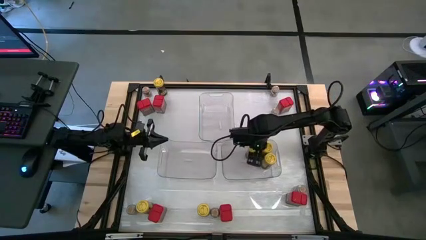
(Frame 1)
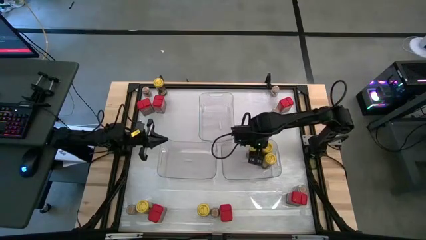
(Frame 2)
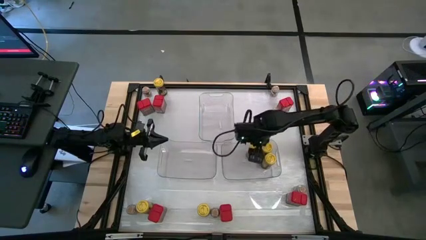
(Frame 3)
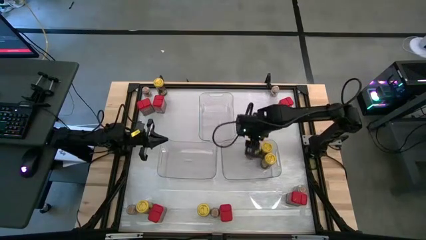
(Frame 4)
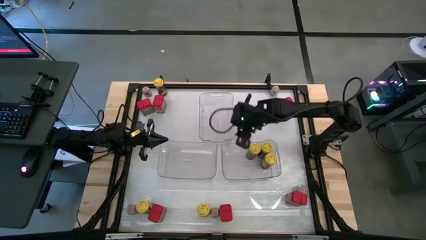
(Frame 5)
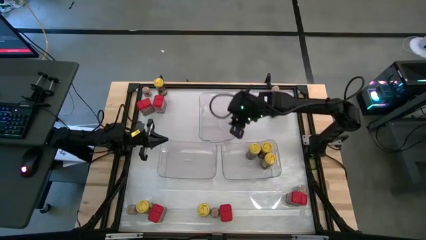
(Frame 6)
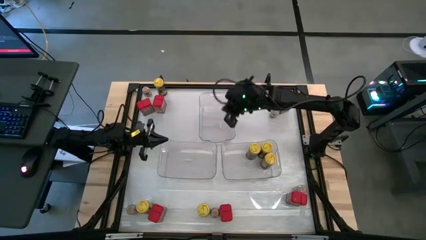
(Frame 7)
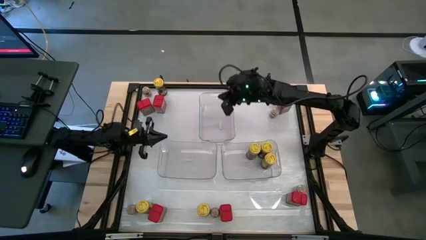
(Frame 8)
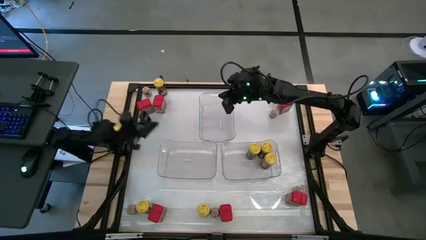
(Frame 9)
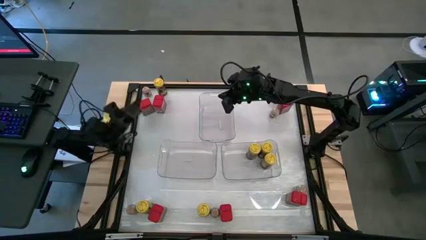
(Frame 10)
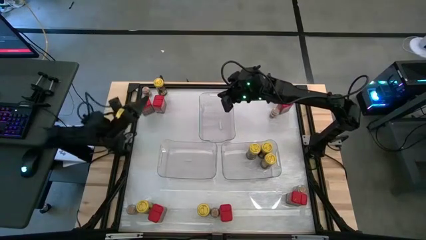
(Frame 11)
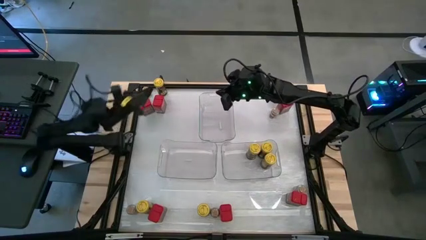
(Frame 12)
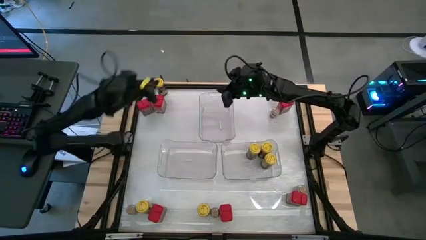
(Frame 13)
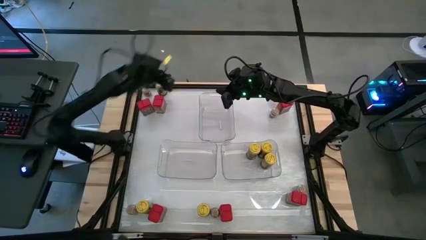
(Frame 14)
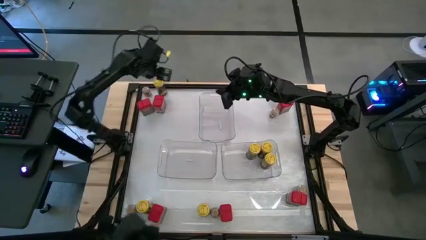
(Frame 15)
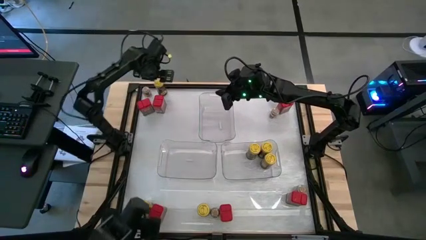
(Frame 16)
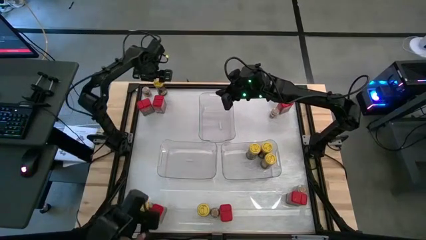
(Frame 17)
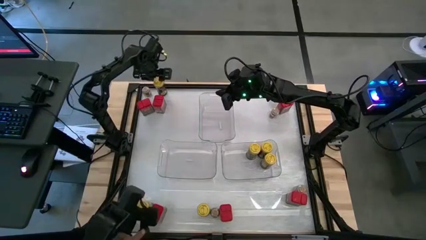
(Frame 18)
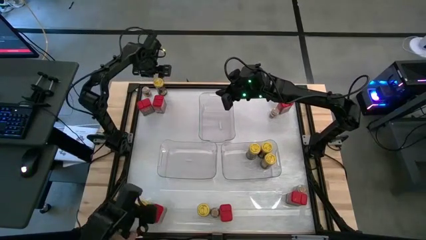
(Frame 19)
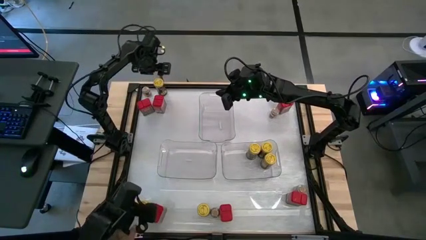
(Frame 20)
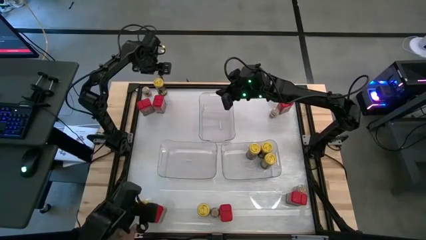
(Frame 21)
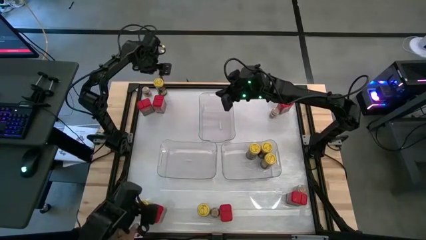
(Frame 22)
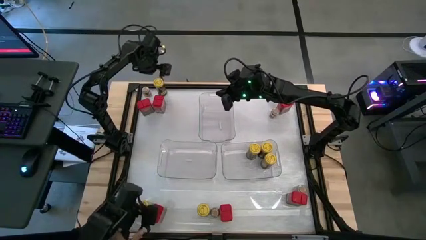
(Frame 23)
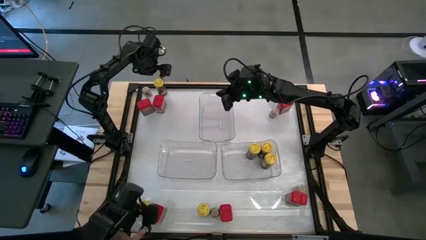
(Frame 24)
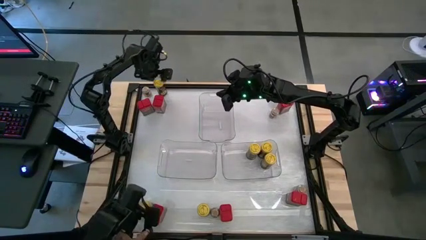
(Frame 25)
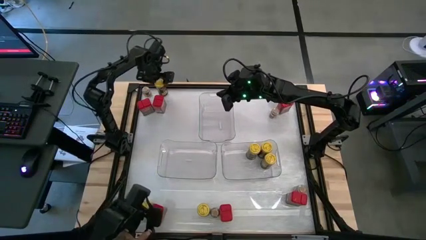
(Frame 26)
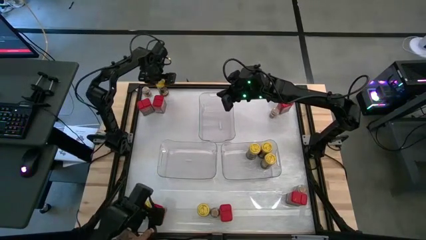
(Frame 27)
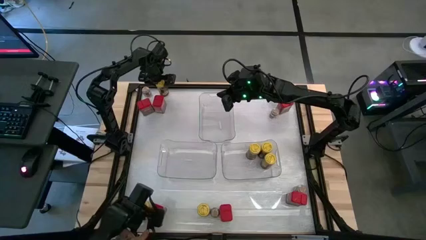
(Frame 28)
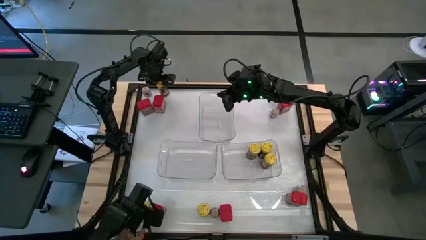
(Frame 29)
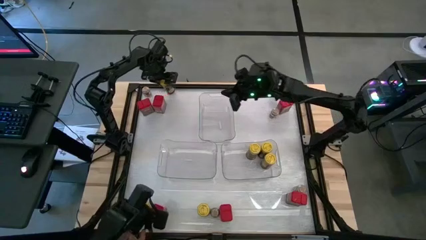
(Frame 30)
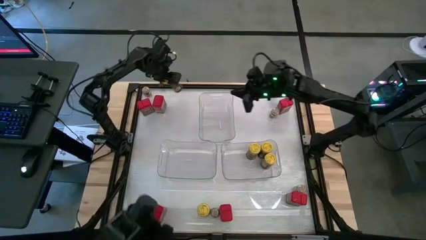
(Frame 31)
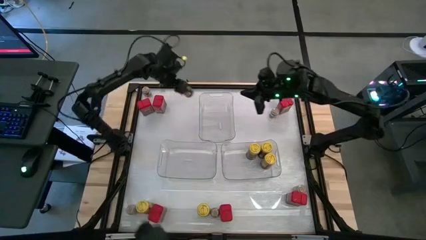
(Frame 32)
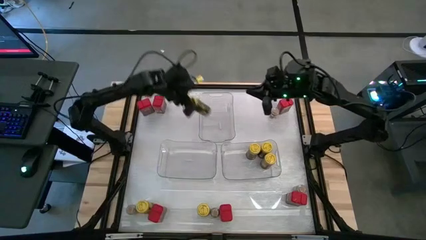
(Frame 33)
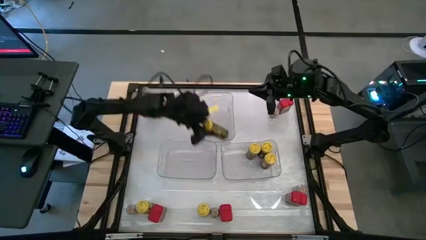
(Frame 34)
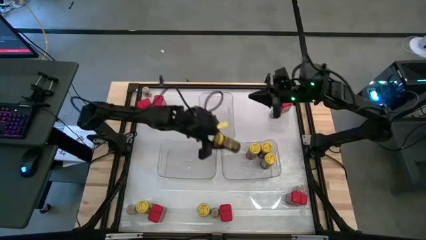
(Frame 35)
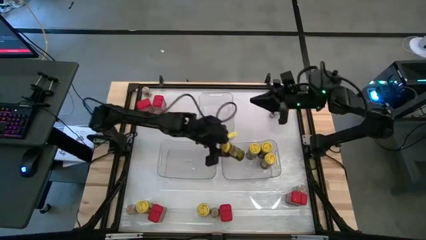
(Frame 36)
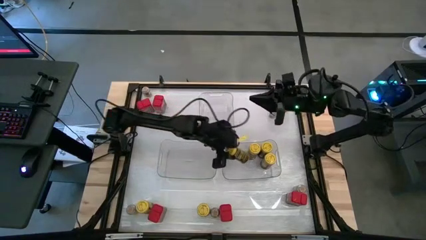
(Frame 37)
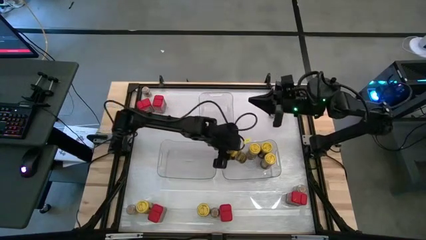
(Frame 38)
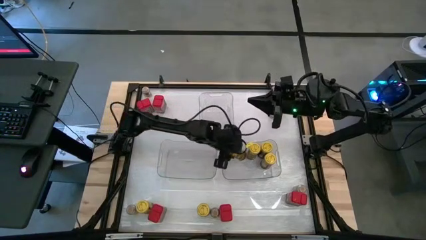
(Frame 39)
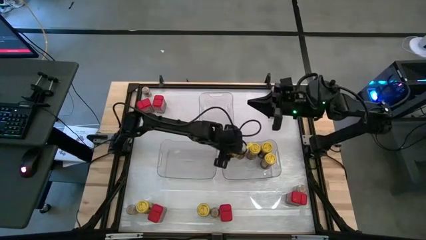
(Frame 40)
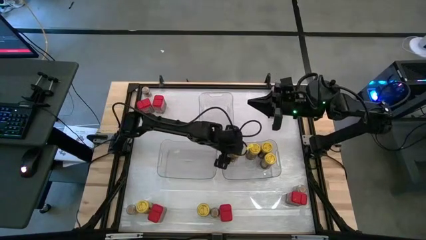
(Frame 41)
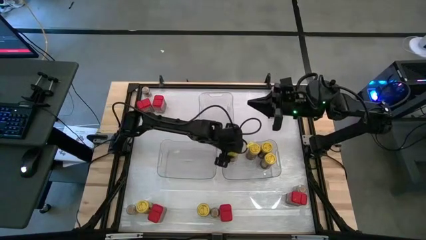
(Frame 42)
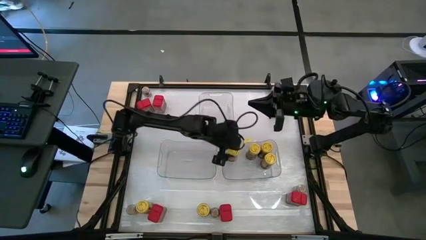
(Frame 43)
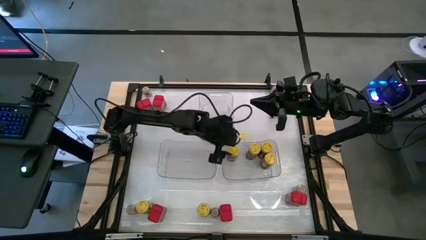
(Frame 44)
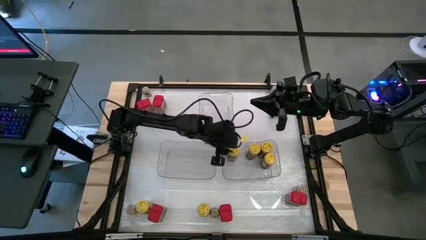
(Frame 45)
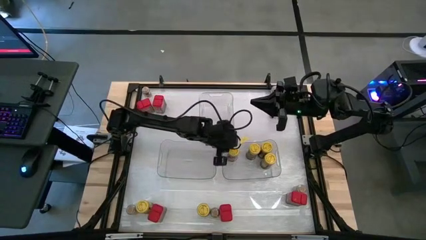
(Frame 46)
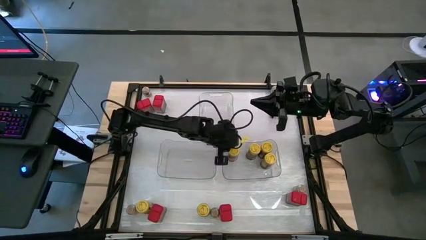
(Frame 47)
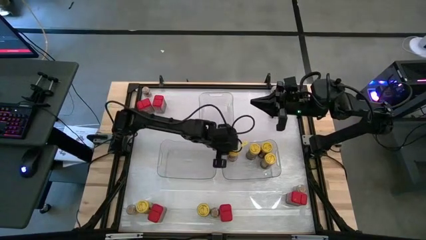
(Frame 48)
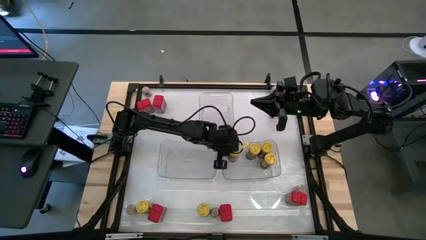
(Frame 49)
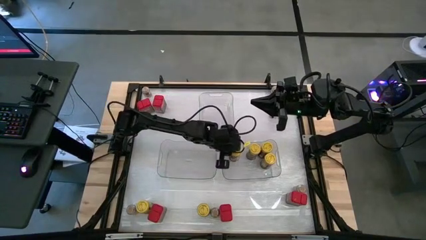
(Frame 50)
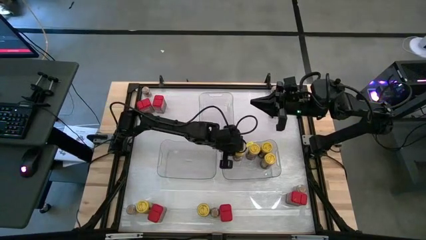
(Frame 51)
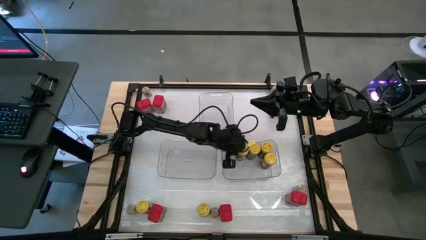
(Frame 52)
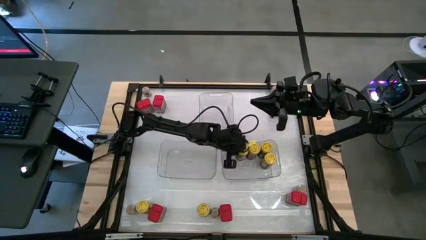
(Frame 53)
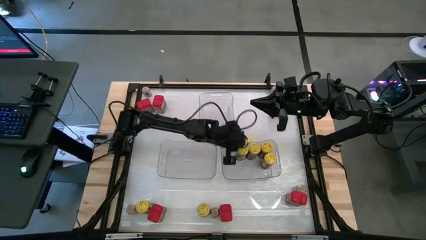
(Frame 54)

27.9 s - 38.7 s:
Task: Sort spices by type
Put the yellow seasoning bottle into the bottom right transparent bin
